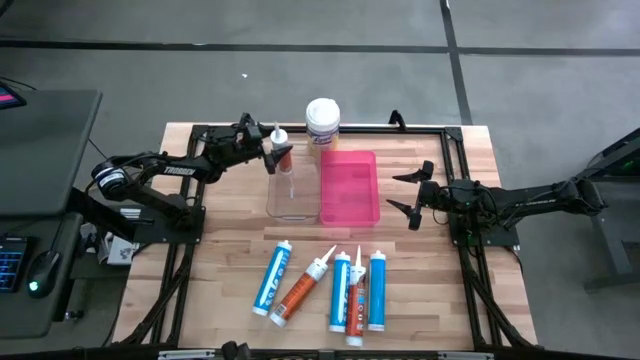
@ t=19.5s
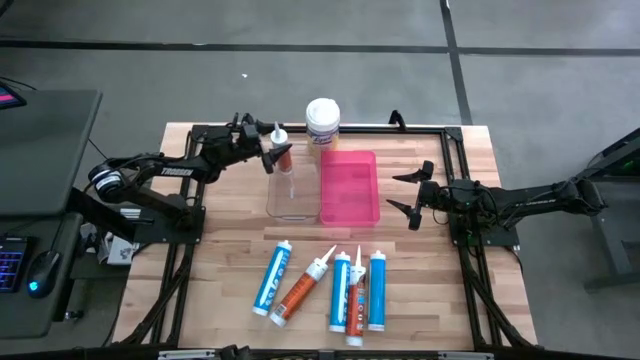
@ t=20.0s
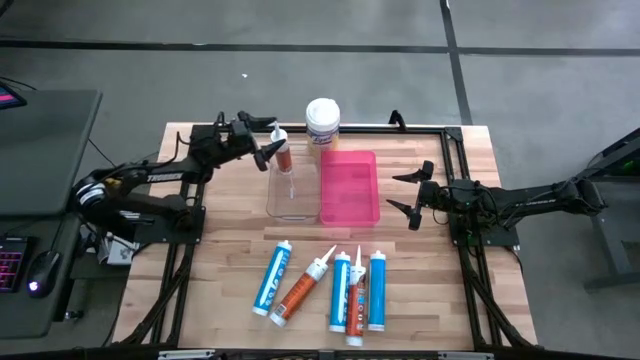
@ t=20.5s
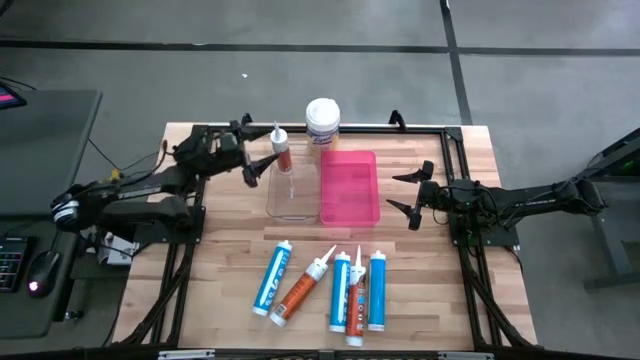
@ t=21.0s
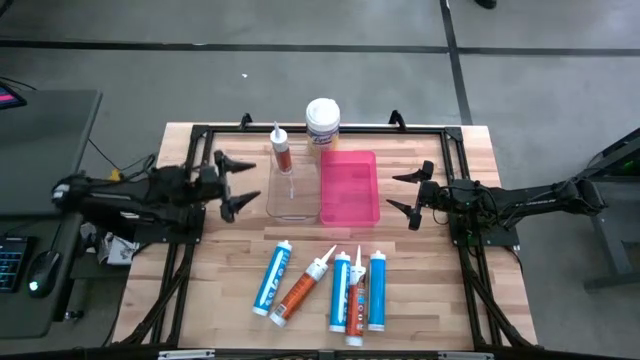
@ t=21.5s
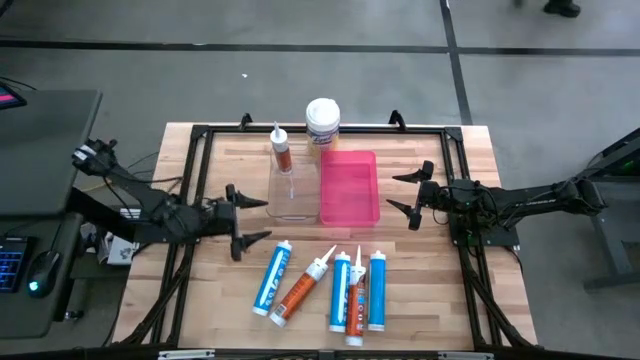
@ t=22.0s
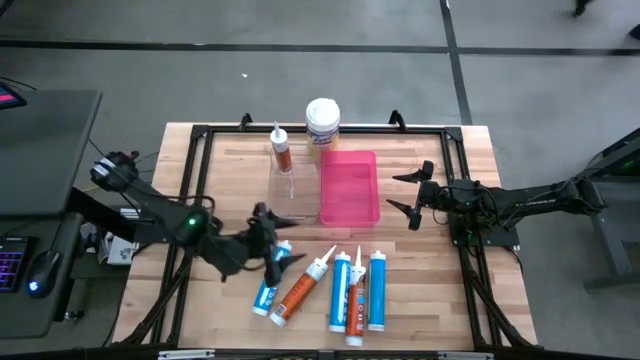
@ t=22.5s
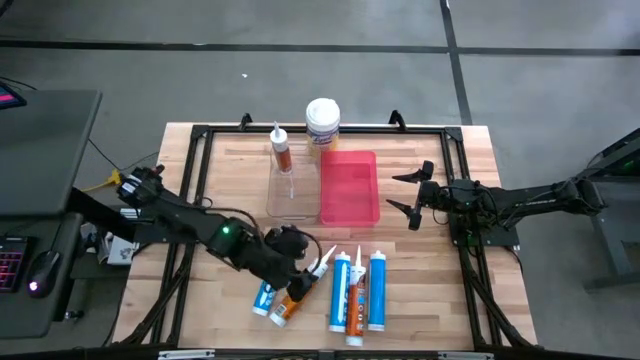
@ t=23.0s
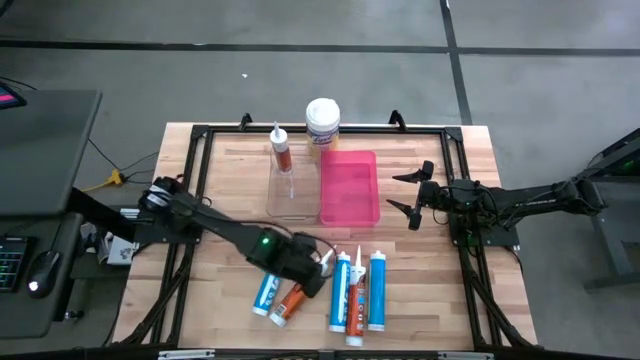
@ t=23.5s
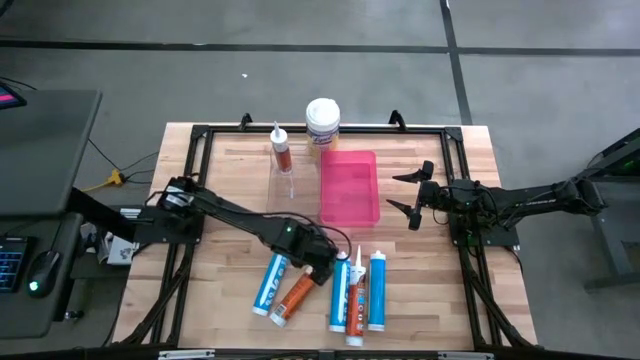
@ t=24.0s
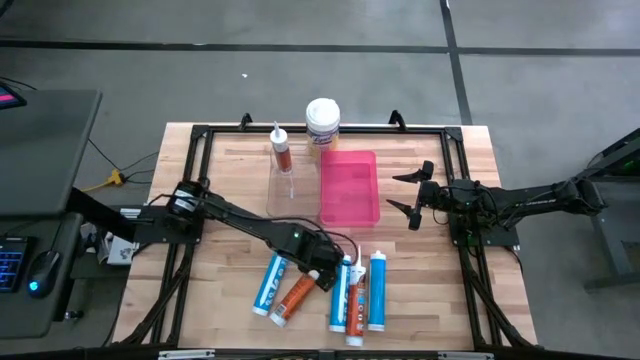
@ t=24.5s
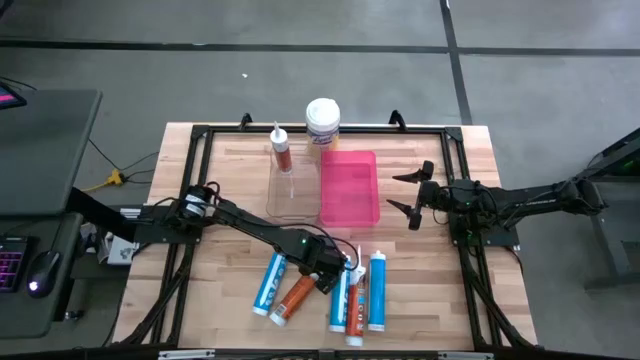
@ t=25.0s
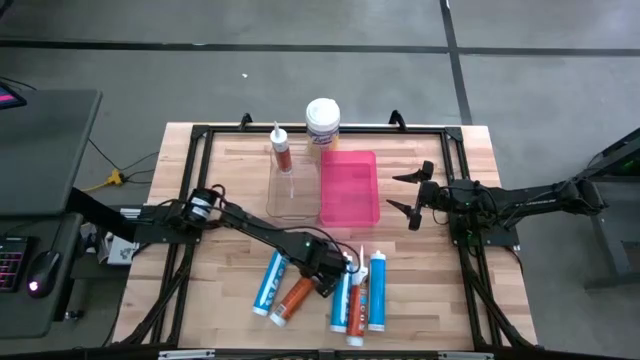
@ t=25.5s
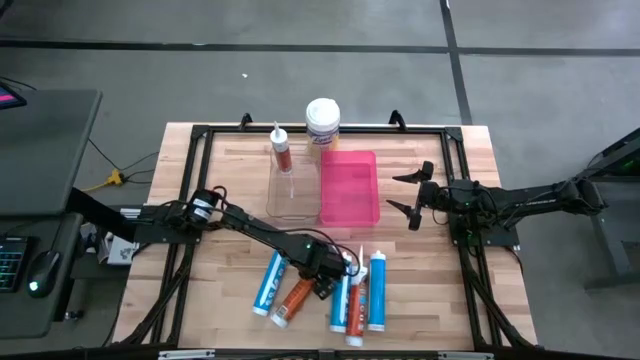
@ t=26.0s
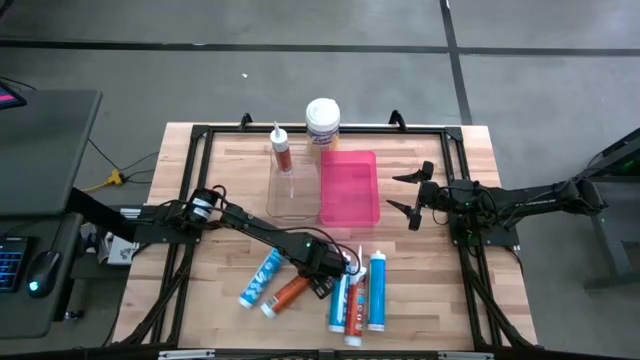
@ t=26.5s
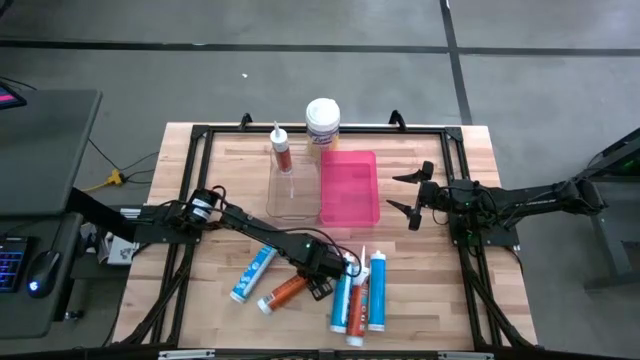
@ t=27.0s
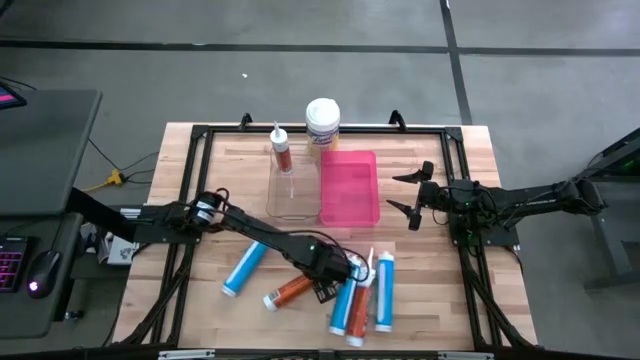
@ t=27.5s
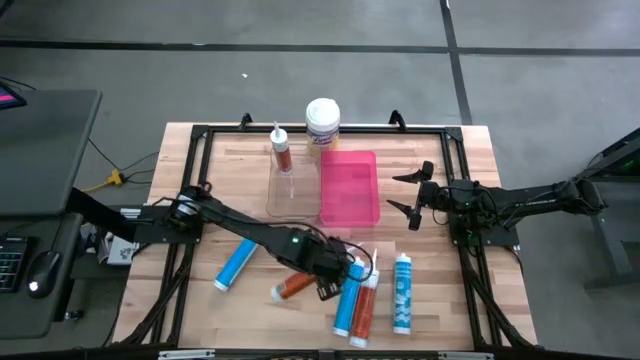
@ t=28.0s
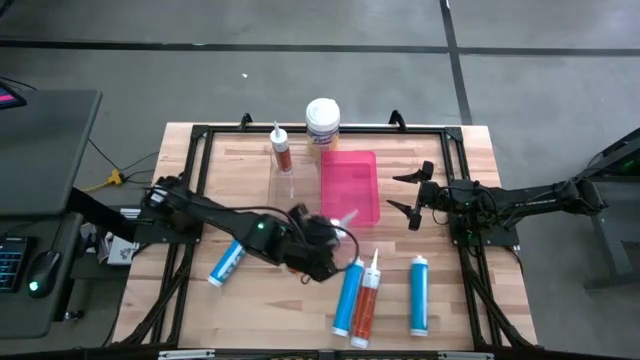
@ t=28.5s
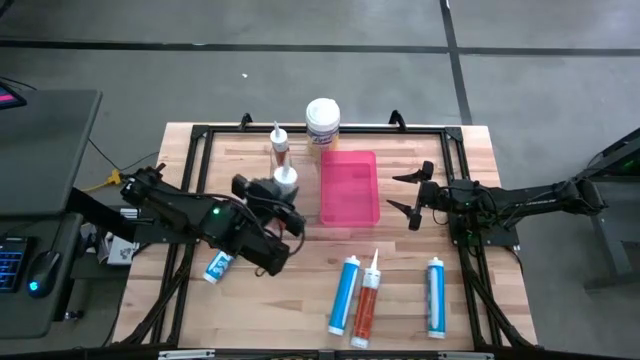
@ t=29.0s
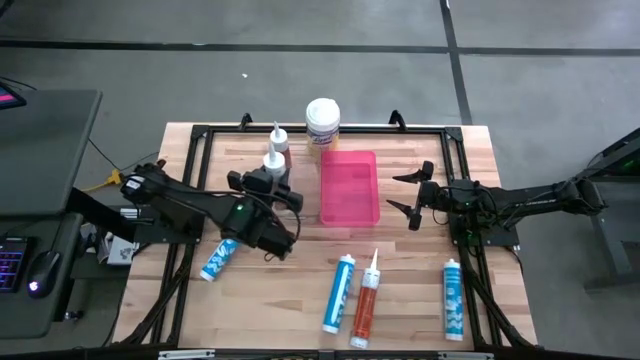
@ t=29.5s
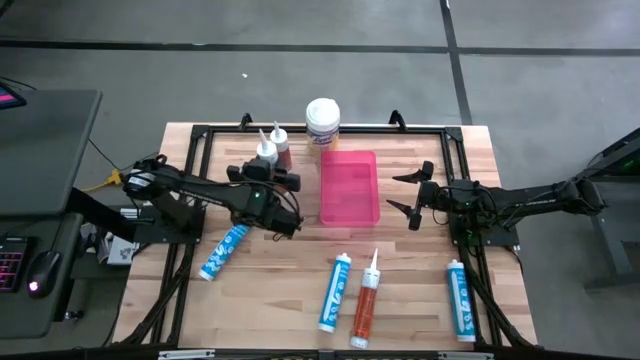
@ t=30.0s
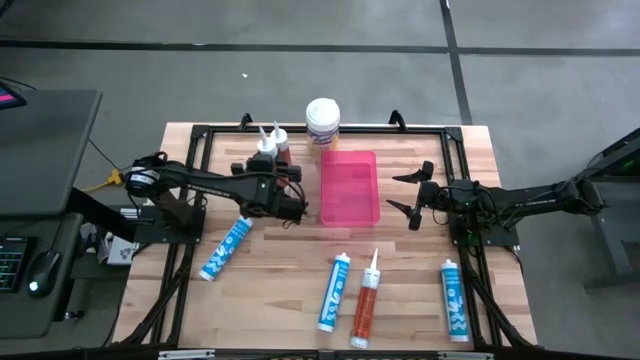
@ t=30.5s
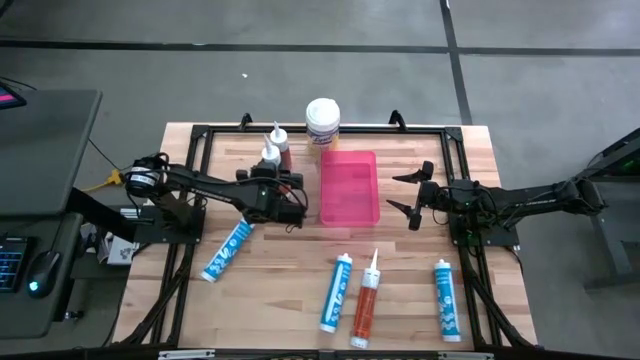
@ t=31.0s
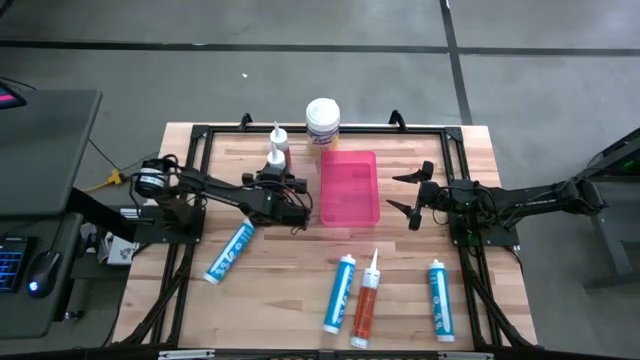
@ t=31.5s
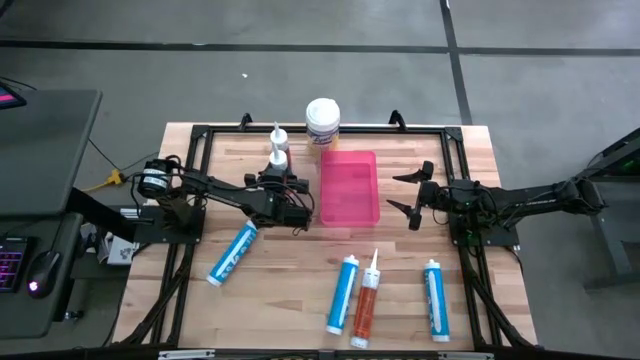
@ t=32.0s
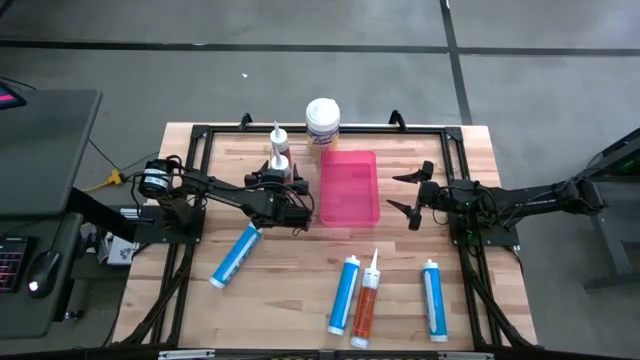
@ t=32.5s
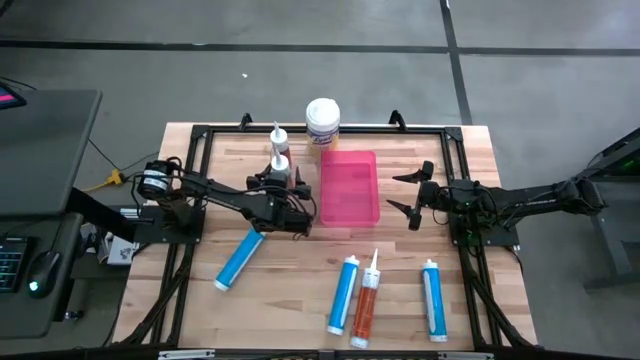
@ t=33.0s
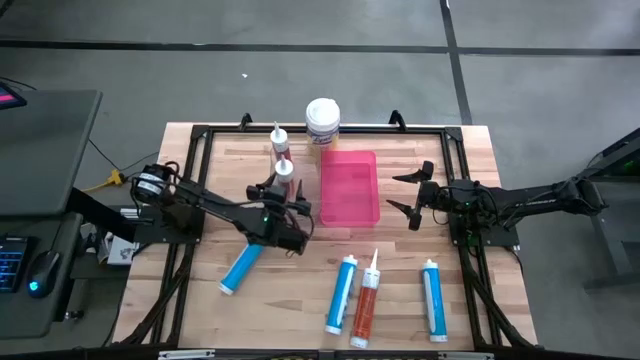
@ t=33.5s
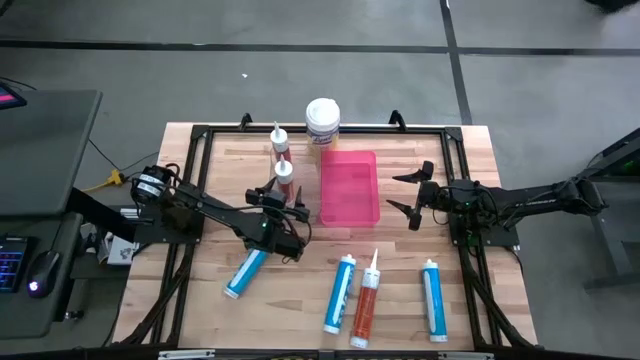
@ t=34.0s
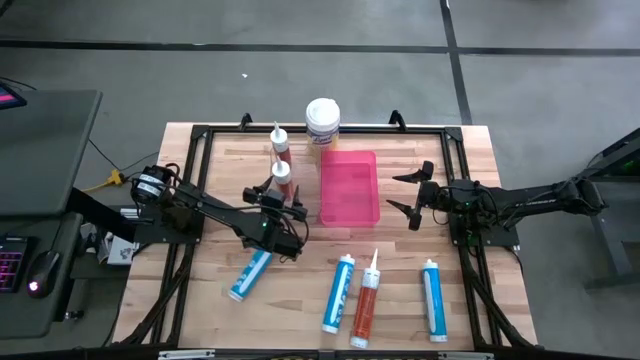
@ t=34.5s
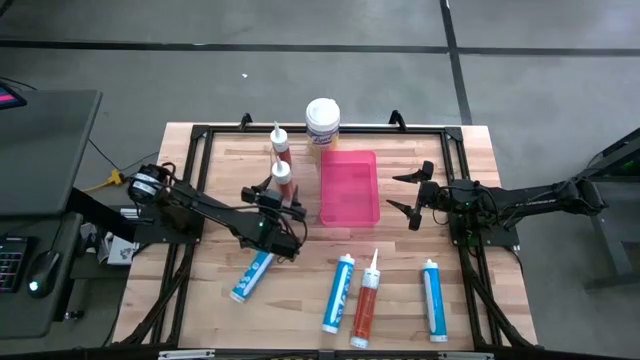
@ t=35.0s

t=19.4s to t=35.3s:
Task: Pick & place silicon tubes, Sealant and Lysol wipes
Put the left orange sealant into the transparent container

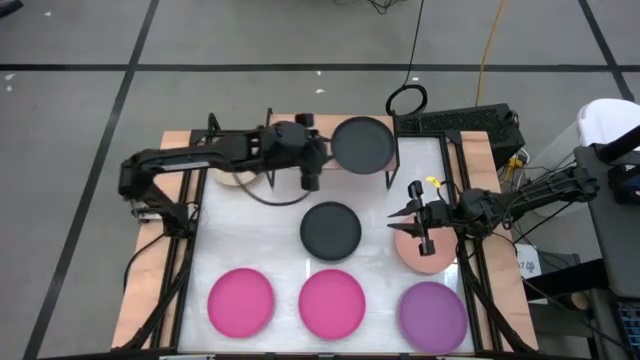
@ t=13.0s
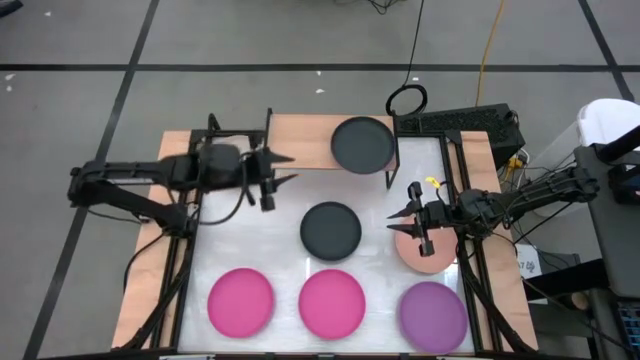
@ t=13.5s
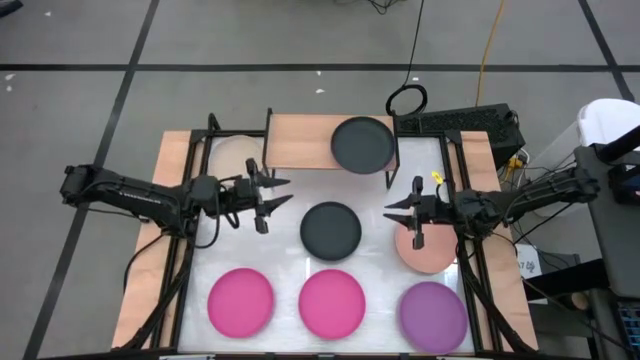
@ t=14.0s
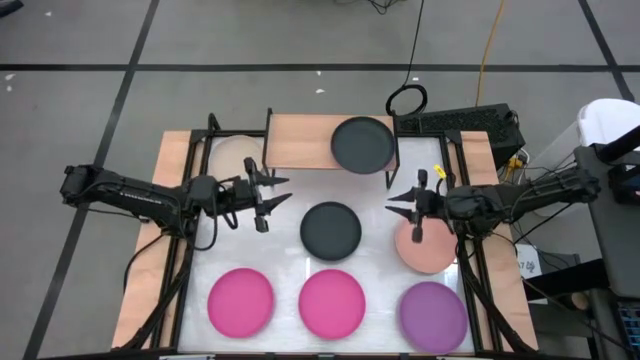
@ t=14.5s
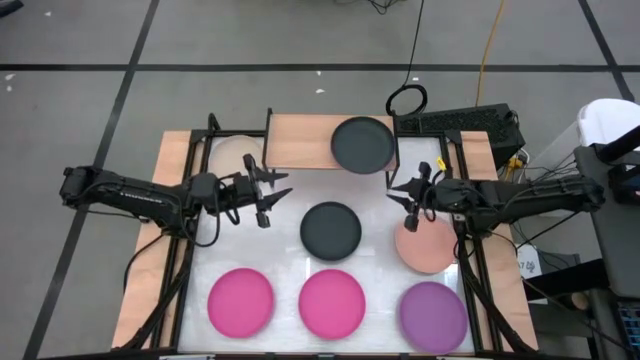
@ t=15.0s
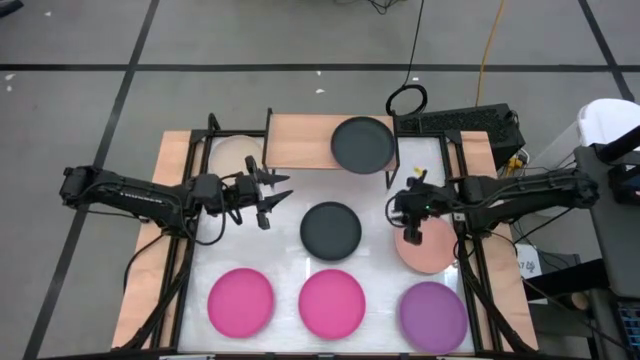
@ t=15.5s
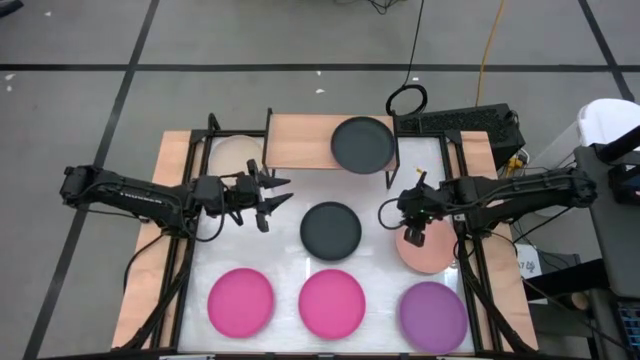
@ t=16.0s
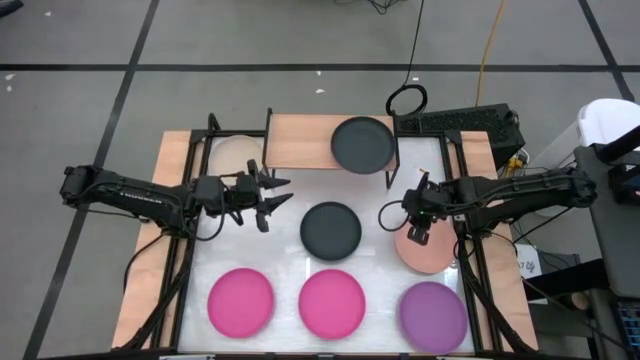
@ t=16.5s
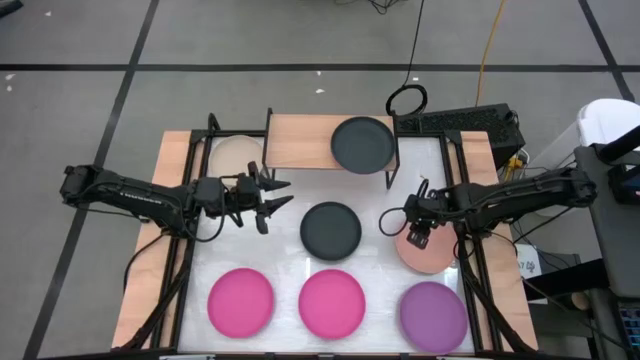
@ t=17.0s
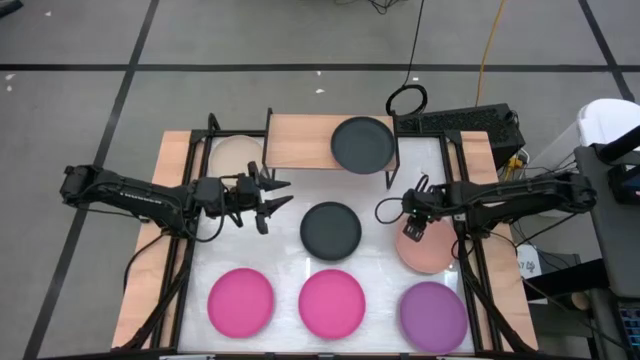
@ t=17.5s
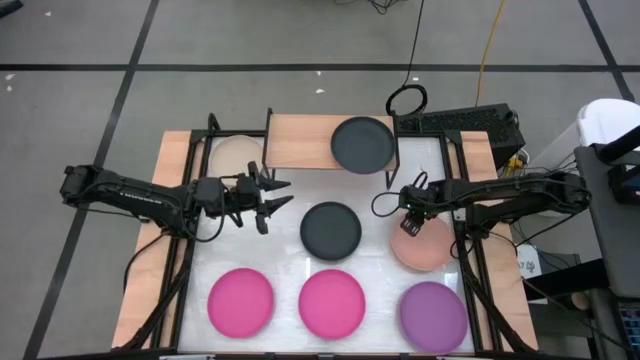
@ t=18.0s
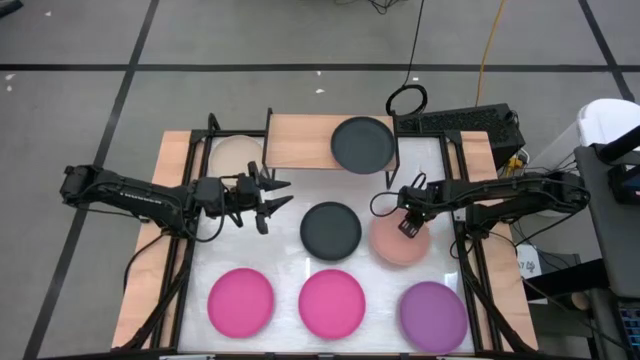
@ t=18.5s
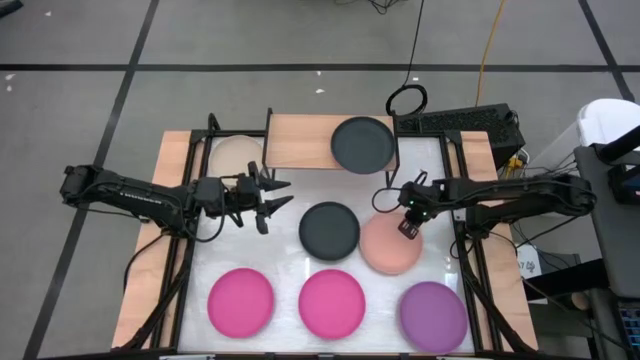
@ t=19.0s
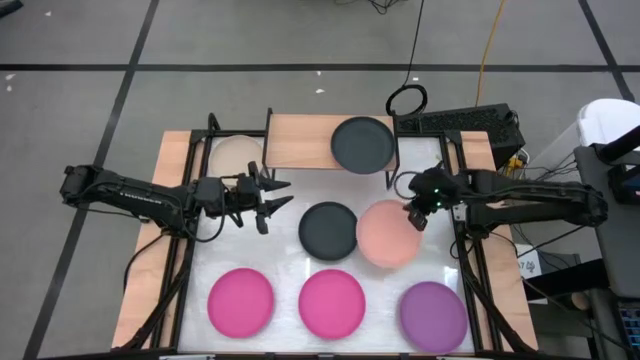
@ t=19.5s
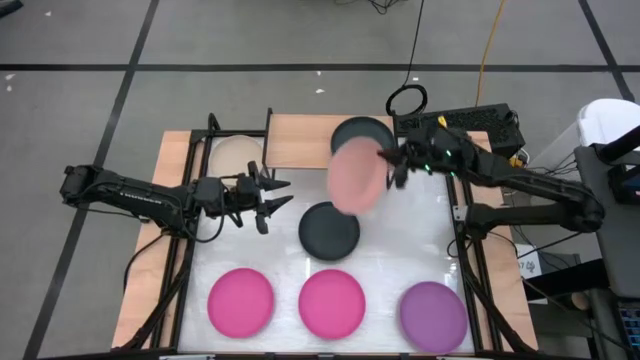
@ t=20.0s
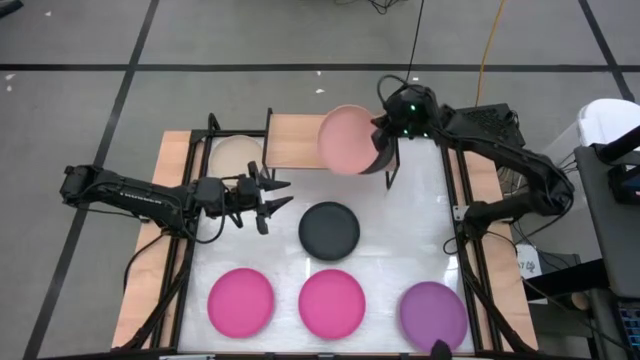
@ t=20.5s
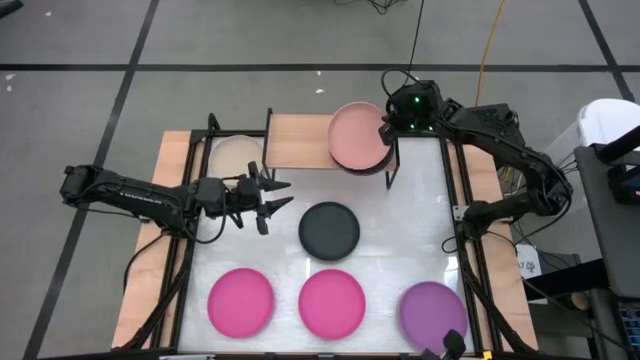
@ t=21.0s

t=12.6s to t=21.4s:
Task: Place and stack plates onto a shelf
Stack the light orange plate on top of the black plate on the shelf
